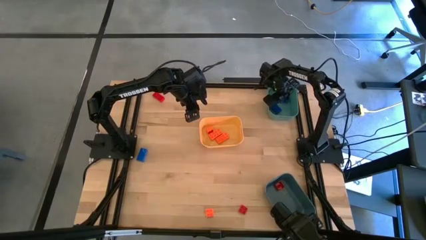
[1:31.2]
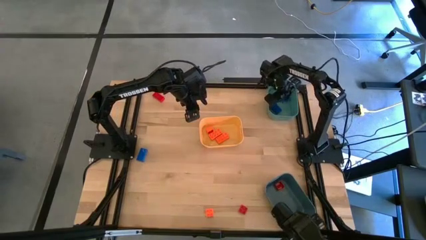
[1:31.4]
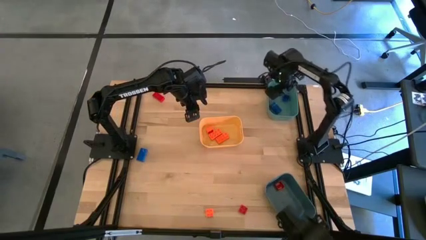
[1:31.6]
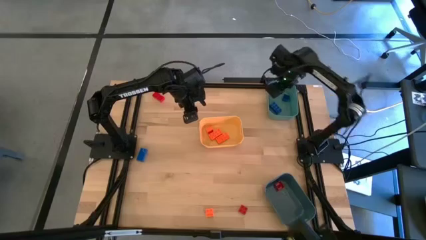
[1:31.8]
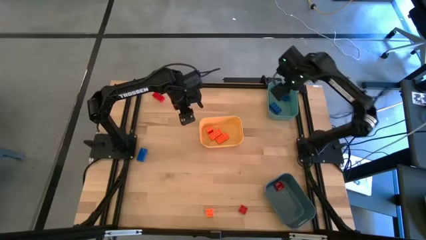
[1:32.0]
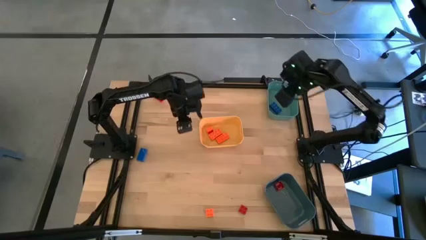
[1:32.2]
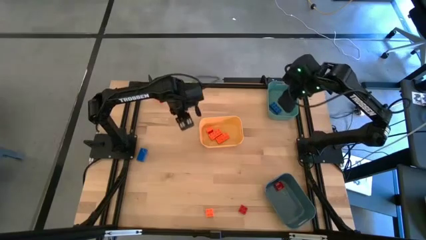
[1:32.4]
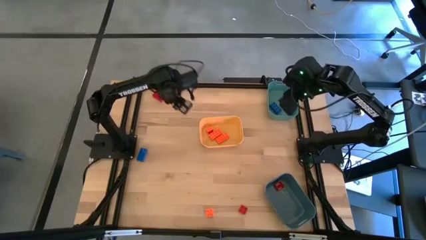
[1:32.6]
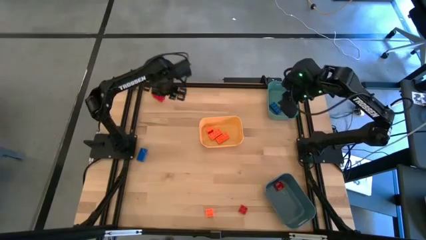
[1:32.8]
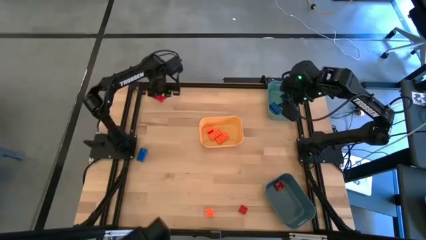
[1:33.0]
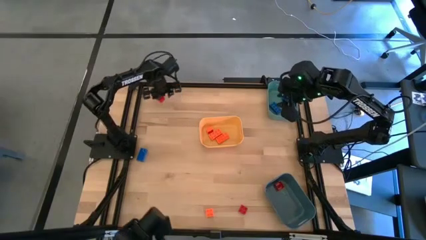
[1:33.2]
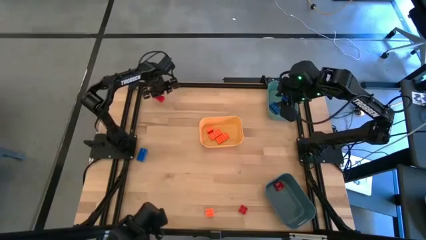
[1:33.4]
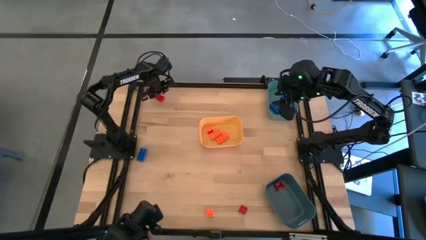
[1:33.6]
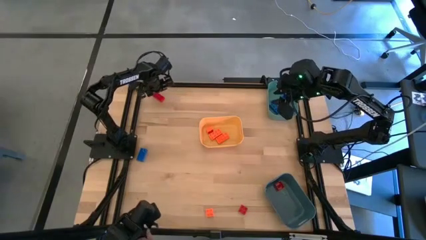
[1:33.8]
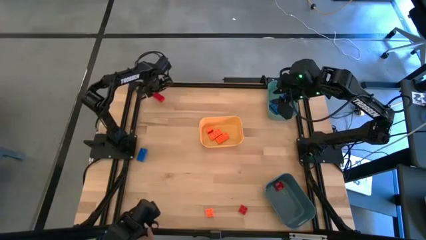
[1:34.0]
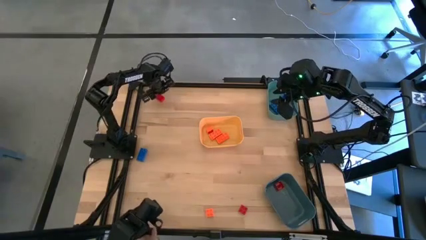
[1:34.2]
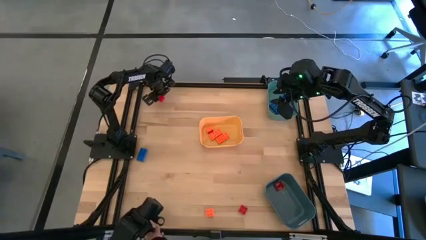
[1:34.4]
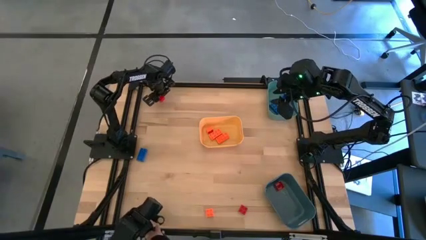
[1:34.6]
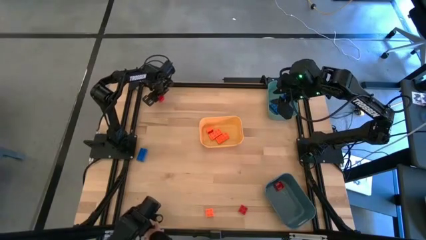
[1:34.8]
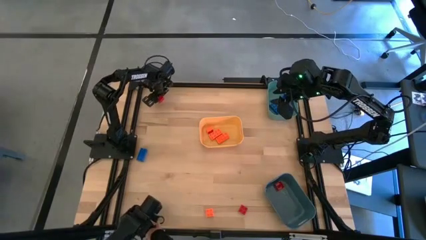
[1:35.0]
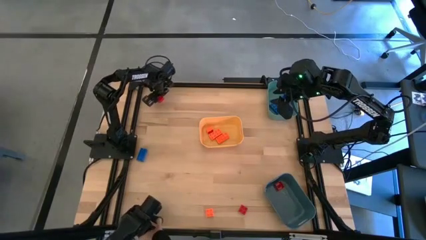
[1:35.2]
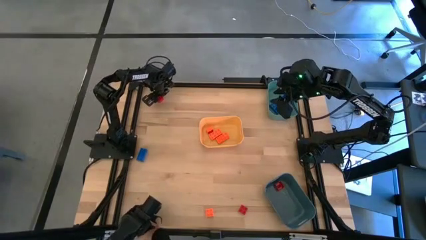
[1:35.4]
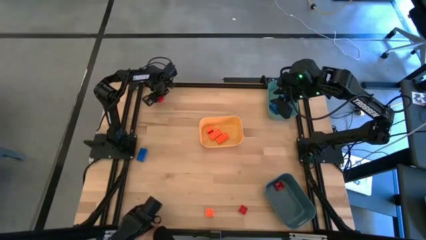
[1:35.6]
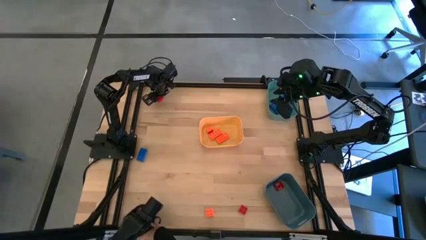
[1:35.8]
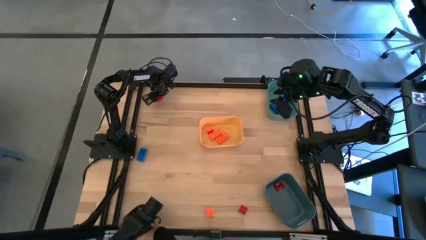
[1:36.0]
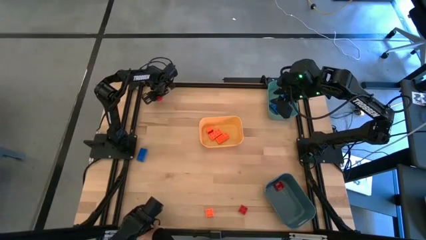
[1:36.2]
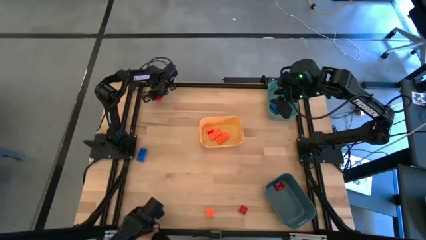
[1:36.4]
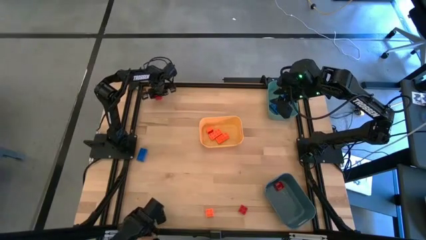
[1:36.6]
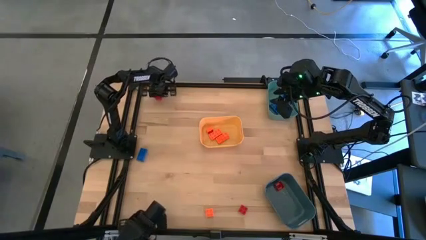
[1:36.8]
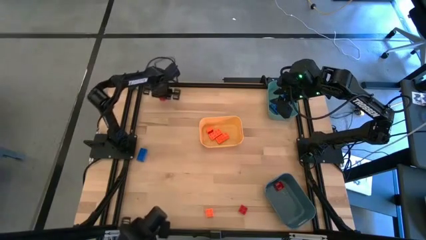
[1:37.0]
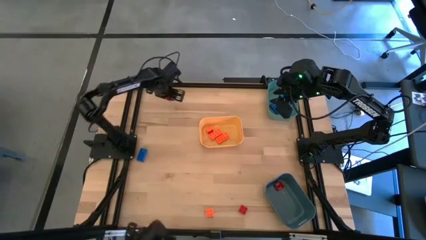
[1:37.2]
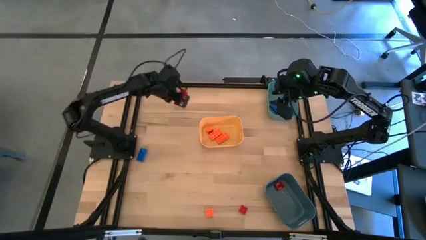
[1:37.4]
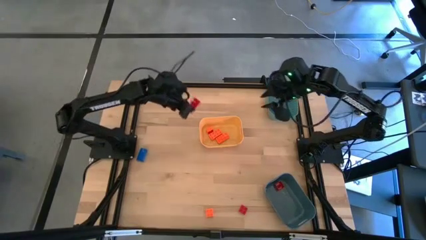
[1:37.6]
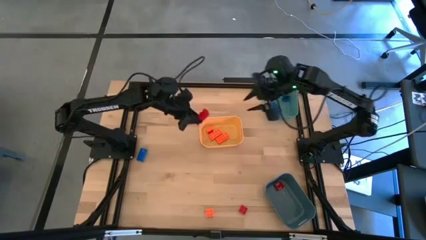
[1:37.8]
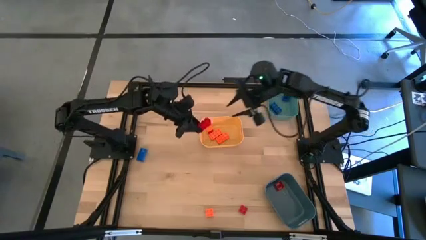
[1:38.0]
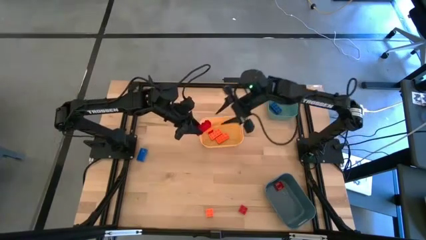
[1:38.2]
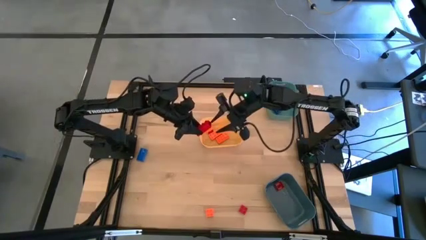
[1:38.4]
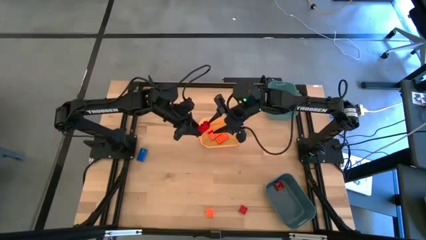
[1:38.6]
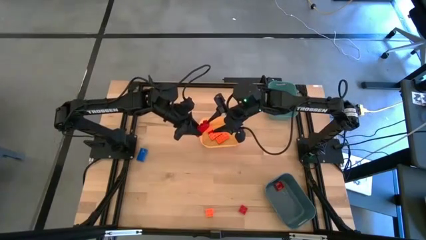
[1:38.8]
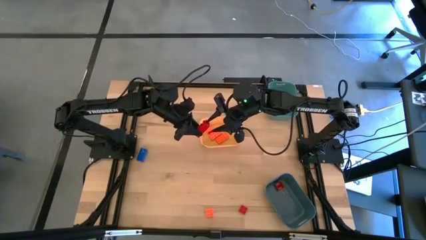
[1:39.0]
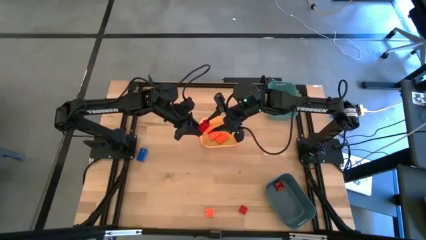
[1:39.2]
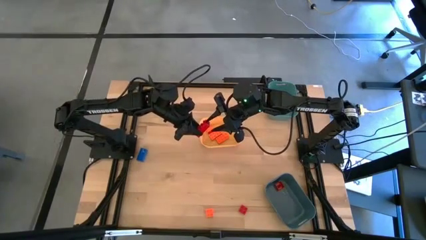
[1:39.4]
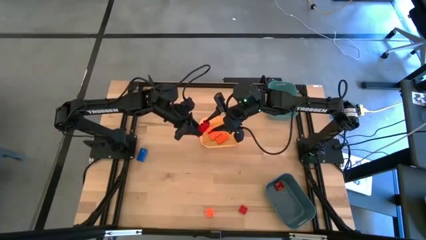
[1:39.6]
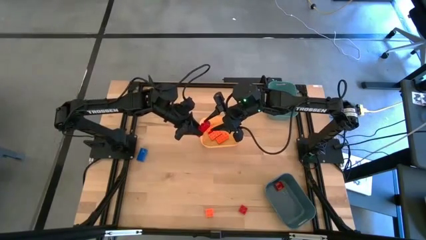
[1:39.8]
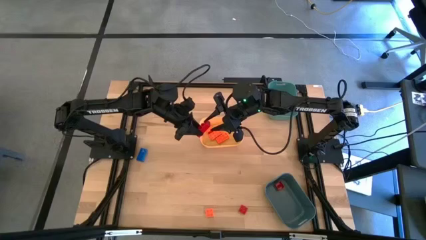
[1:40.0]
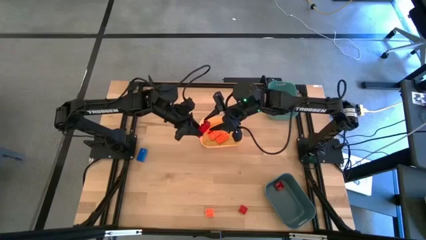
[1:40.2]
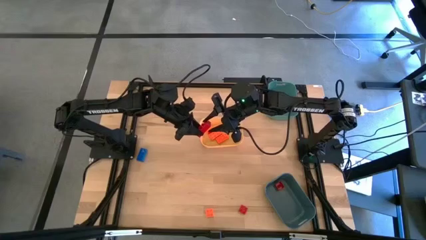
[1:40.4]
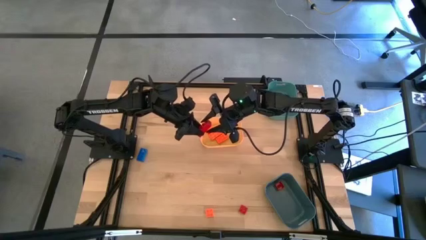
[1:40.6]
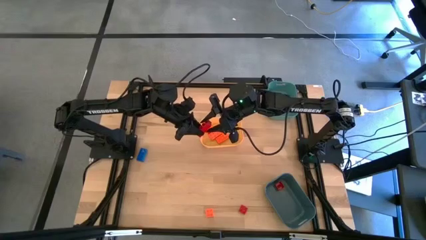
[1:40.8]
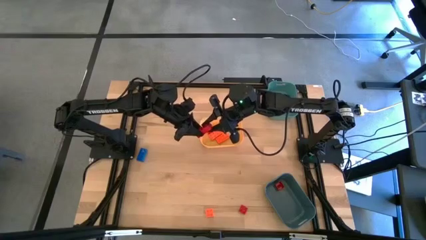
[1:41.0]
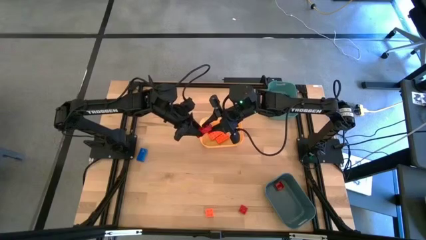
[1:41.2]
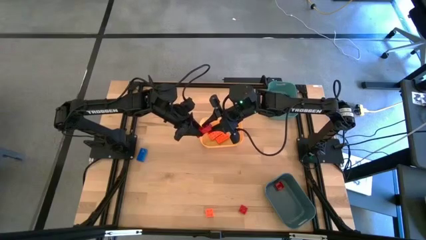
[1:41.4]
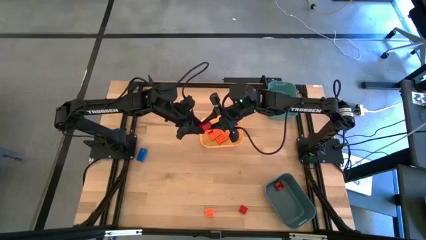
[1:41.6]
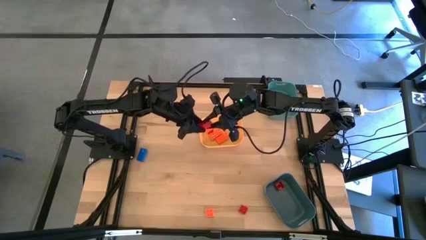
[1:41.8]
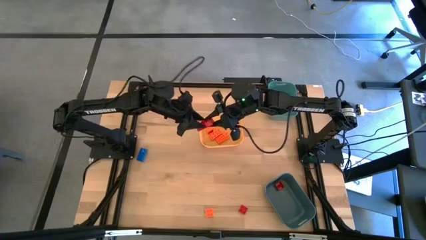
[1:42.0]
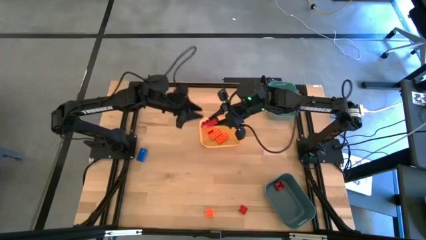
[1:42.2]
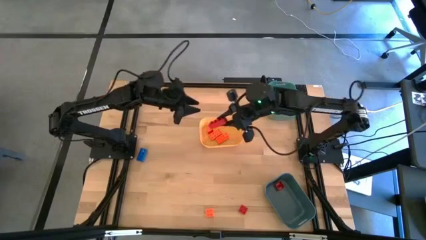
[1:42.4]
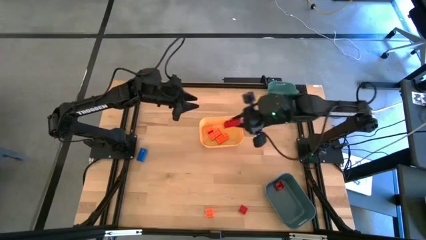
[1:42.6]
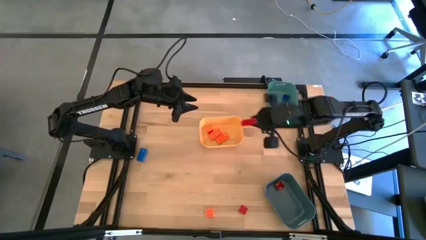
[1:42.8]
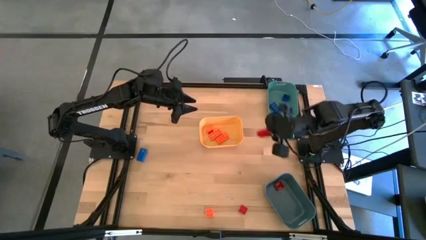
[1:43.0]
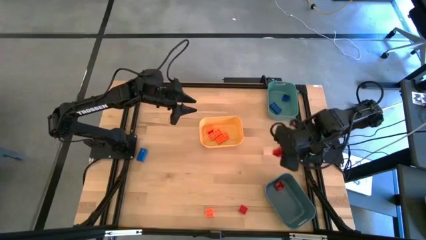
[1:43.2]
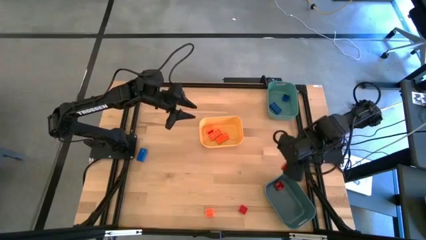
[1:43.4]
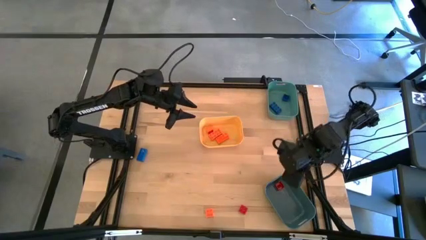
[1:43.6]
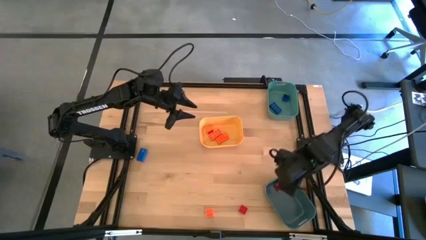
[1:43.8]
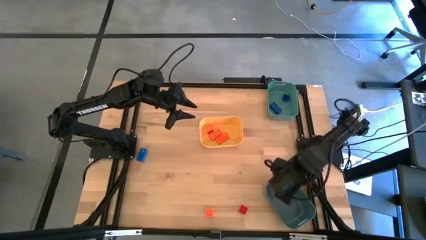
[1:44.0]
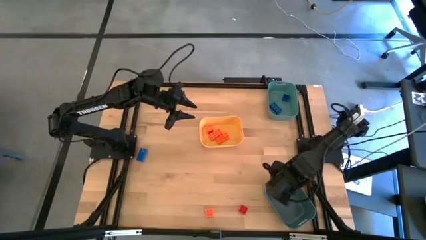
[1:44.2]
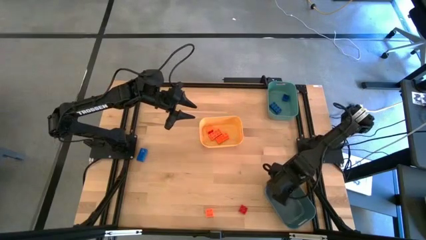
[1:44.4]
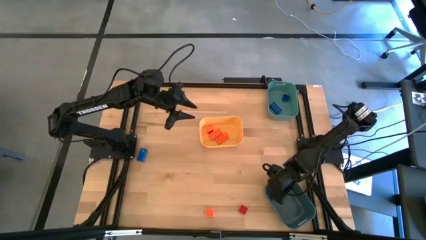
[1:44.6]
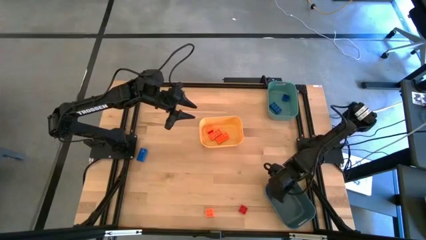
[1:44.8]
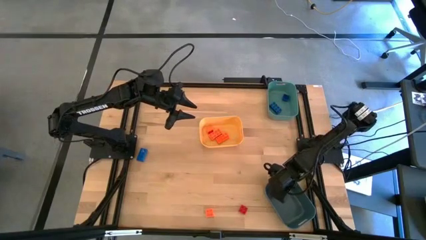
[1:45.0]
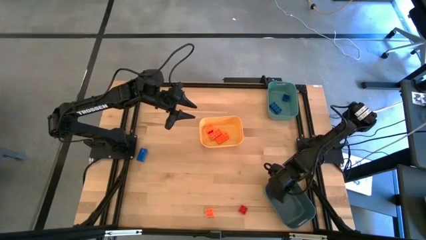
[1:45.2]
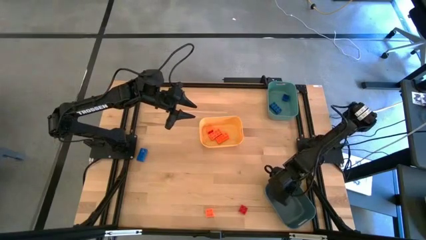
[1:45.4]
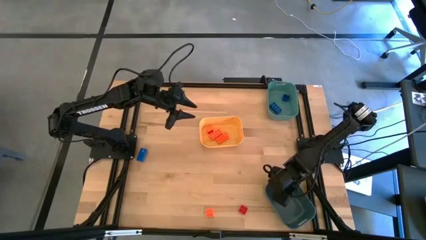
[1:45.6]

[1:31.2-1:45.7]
Task: Sort & place blocks by color
Put the red game piece into the gray bin
